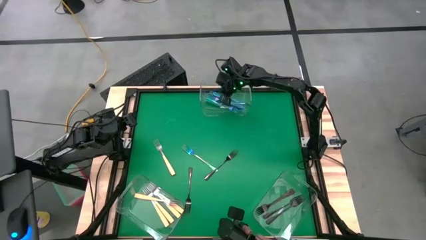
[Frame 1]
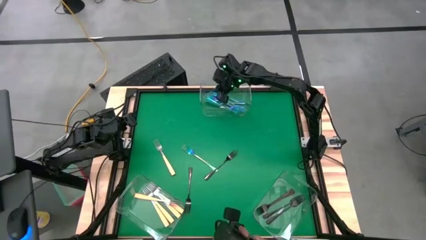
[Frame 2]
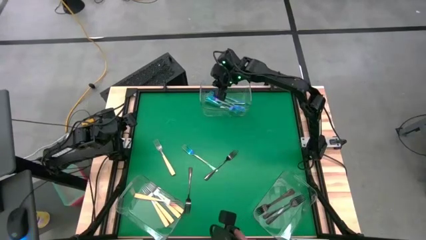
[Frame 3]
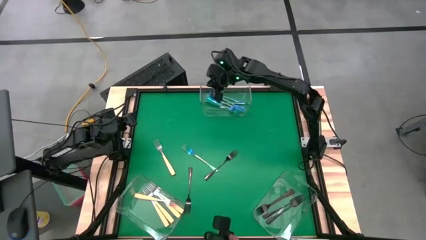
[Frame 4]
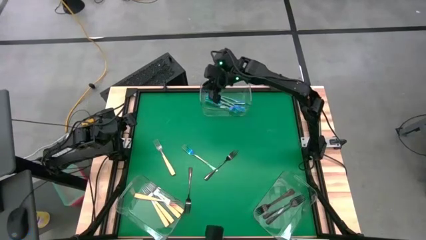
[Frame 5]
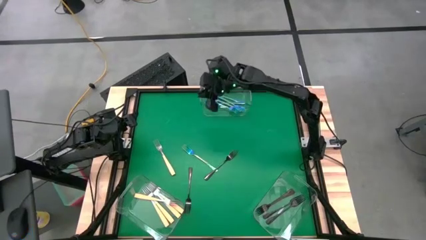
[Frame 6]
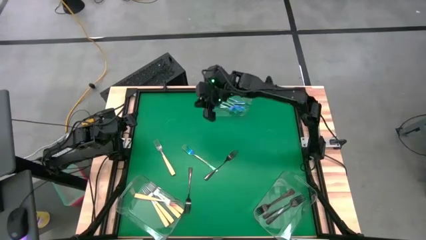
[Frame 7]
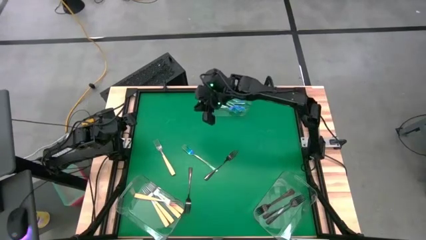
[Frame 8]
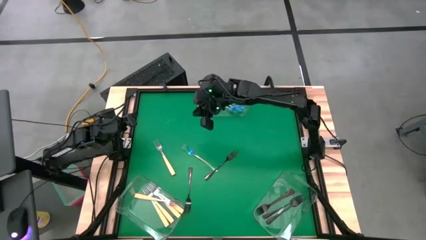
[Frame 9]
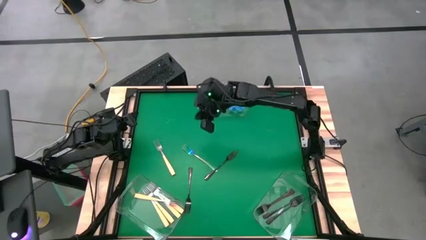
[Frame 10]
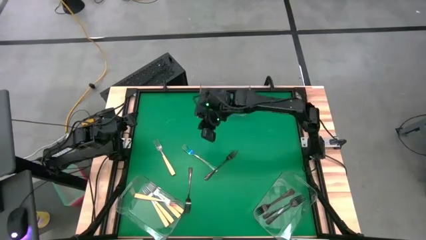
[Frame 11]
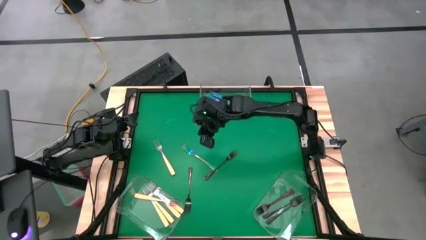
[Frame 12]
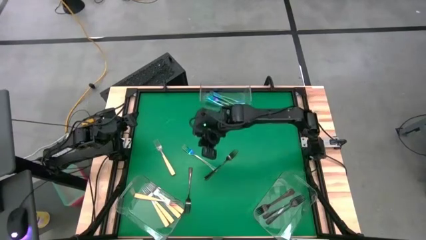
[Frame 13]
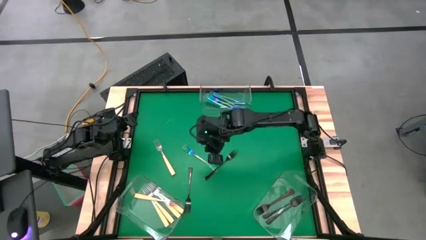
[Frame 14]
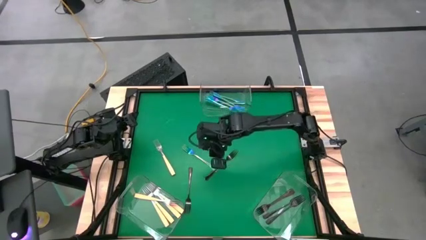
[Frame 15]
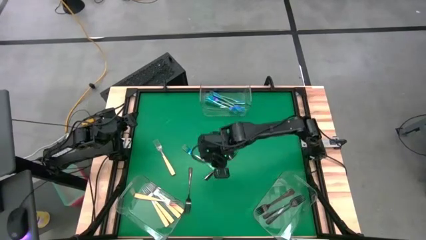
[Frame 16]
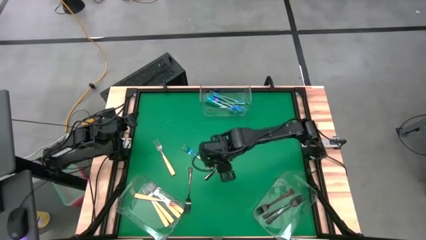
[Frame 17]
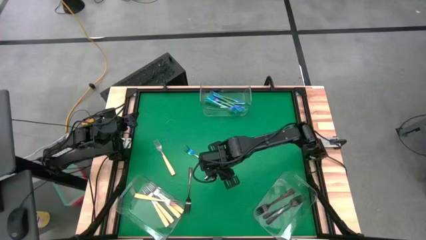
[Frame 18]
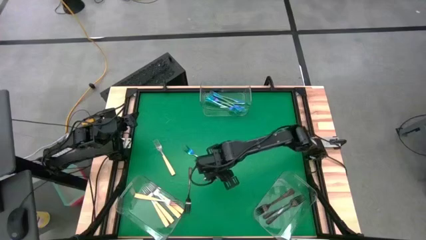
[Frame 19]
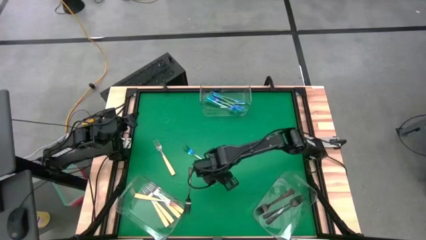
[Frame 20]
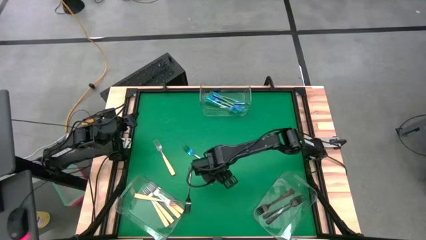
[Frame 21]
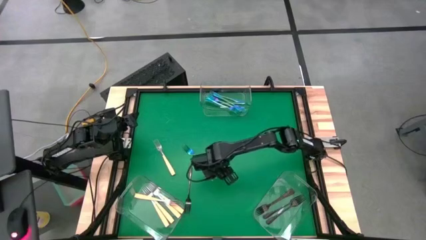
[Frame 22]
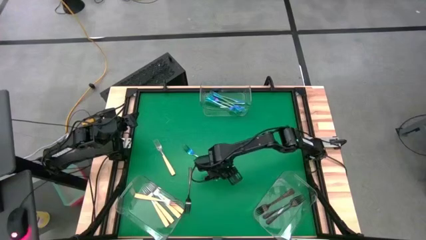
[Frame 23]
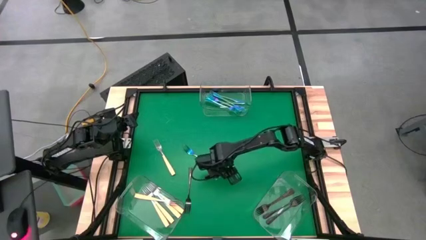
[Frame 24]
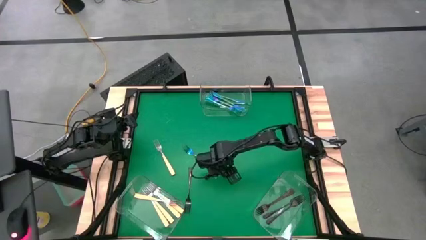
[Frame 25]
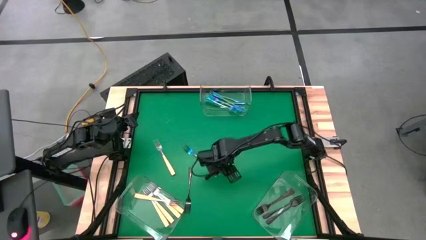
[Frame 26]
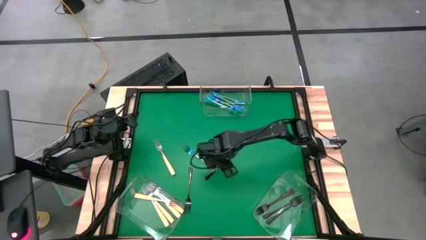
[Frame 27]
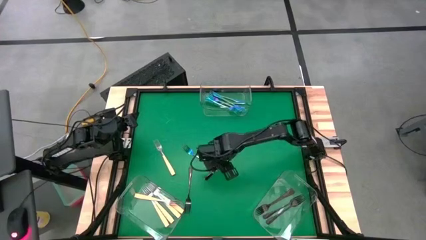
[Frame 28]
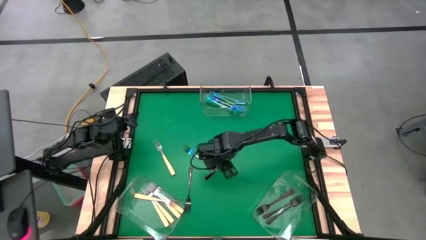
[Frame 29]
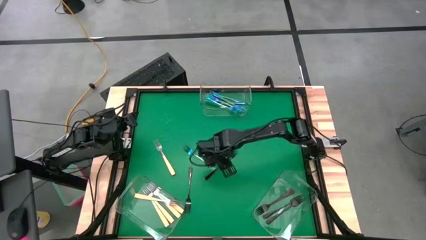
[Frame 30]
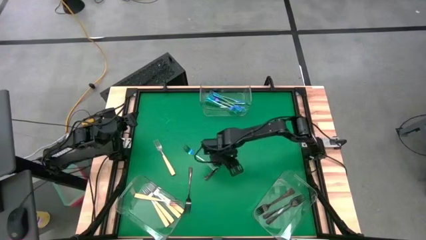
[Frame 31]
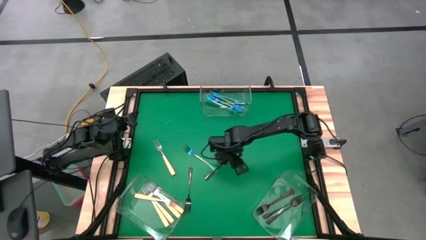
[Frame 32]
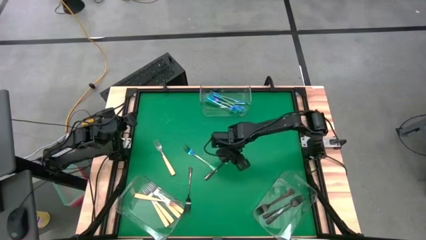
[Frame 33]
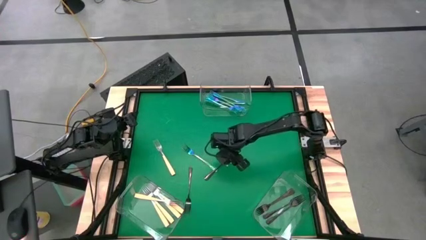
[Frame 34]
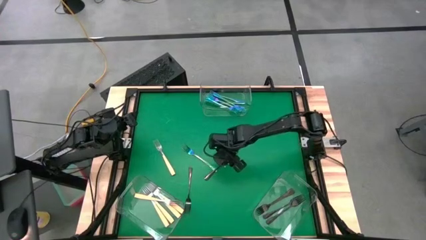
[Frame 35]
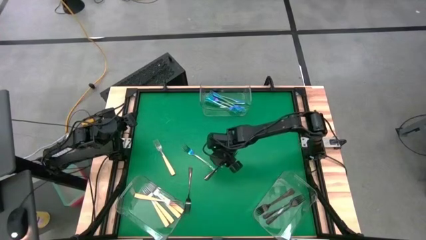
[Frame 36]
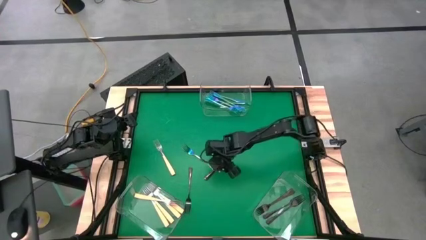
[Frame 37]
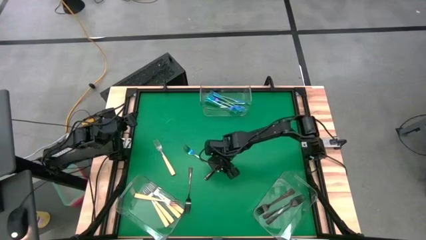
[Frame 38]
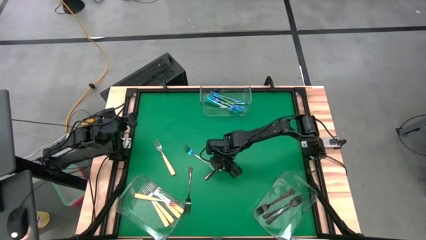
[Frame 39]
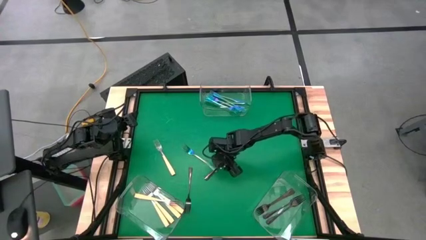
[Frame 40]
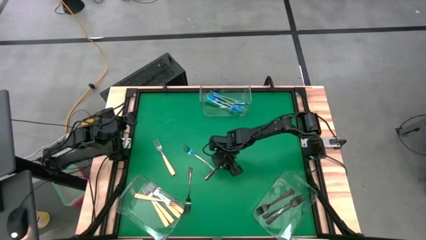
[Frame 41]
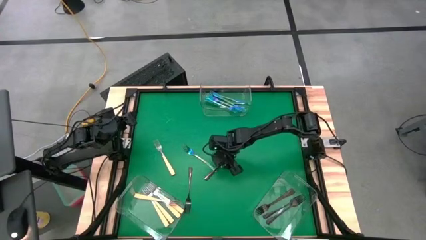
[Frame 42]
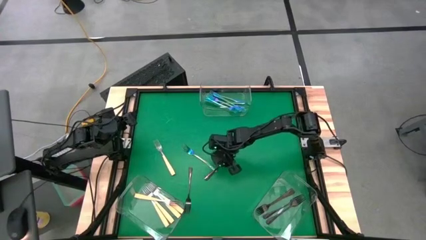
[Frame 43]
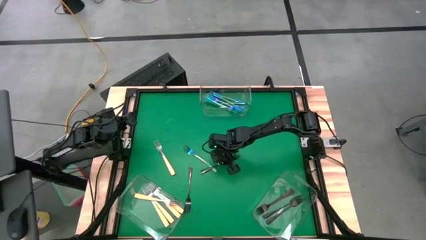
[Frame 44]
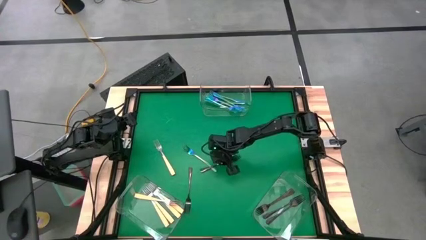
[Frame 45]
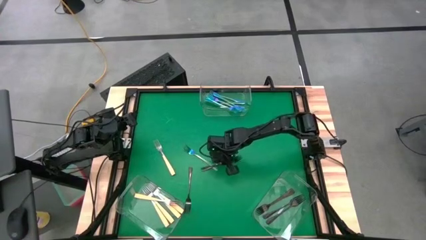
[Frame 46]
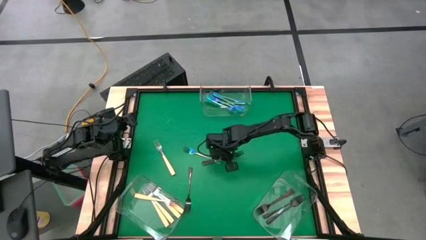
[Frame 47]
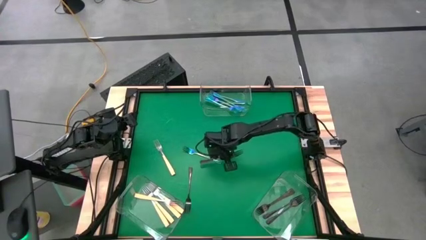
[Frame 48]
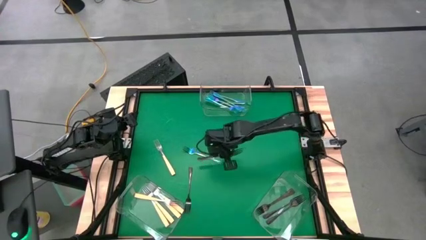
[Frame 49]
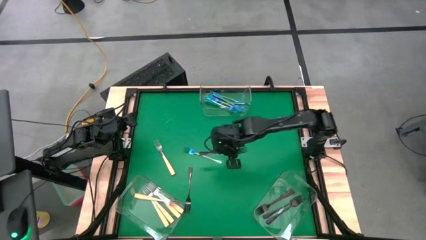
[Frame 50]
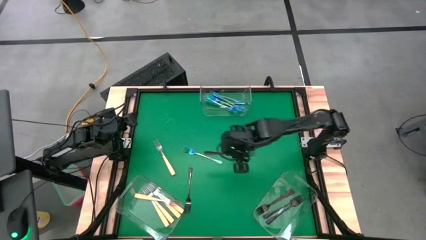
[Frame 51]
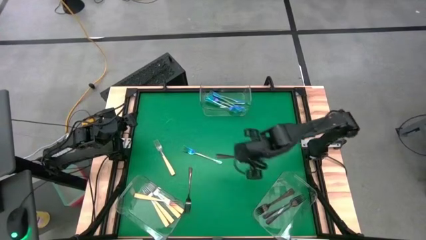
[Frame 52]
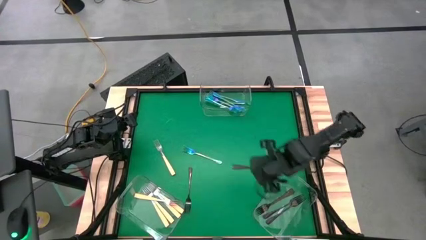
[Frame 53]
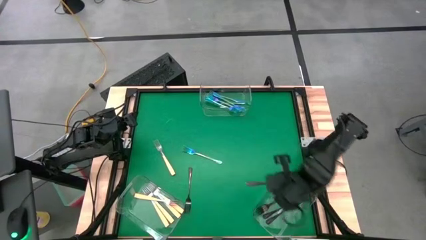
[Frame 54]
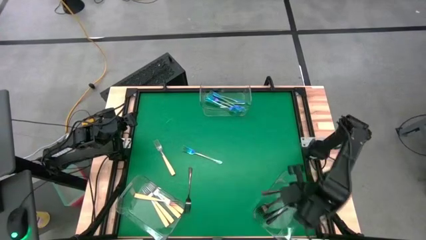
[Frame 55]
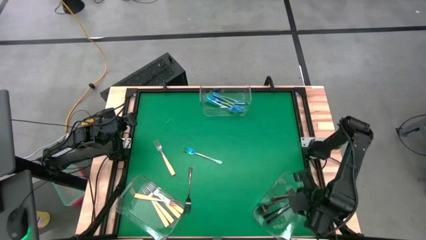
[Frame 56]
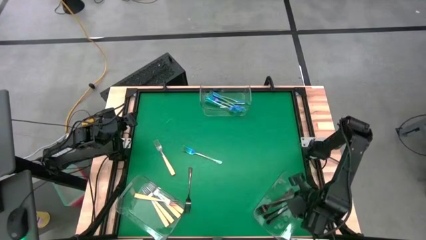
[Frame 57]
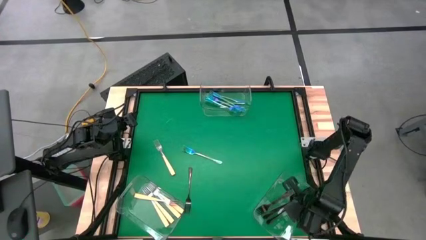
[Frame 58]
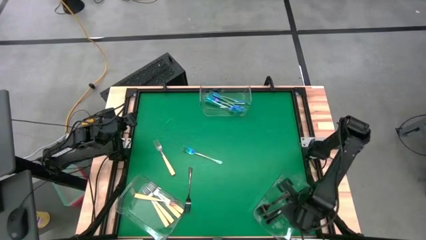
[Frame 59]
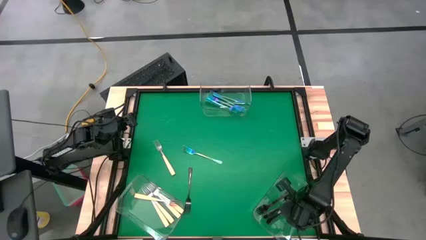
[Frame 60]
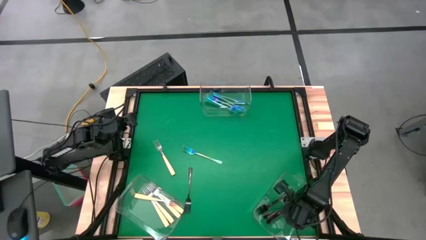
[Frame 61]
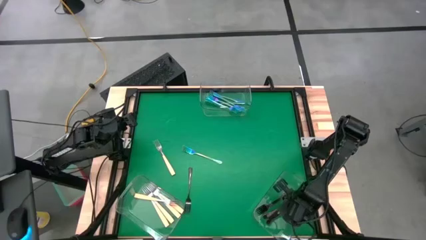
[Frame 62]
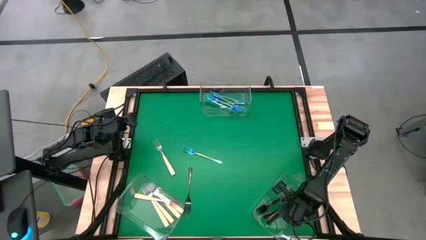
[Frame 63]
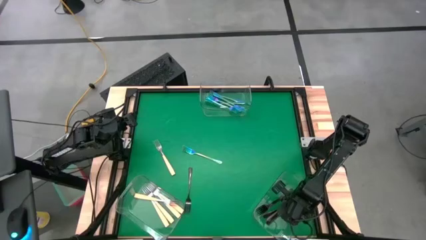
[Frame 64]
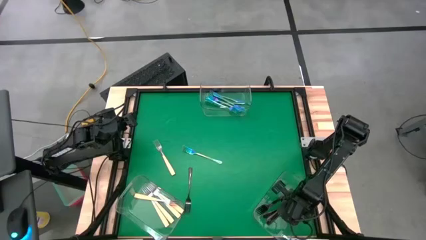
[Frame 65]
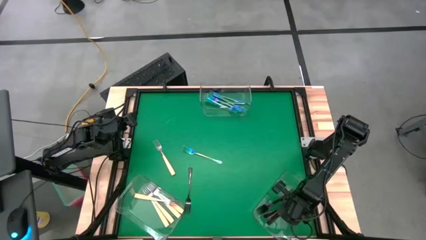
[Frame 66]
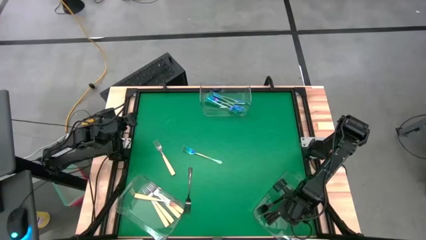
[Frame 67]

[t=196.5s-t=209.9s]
Task: Sort silverware by color (type)
Put the black fork into the bottom right transparent bin

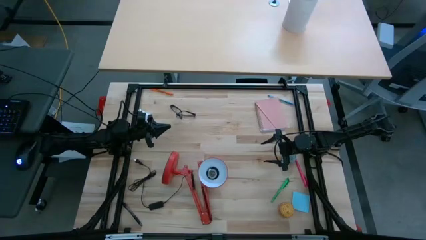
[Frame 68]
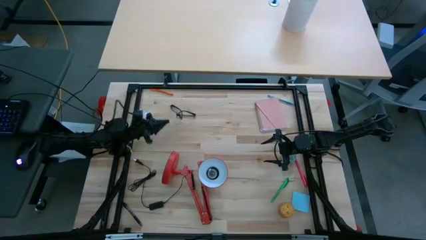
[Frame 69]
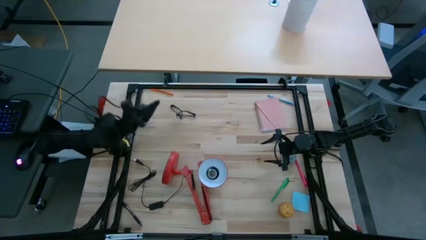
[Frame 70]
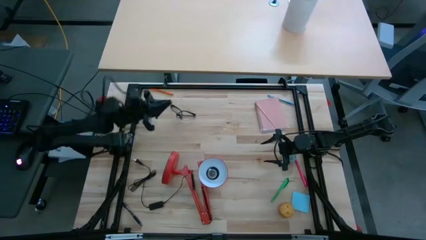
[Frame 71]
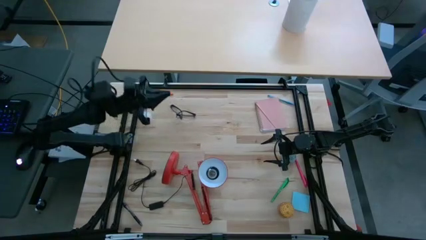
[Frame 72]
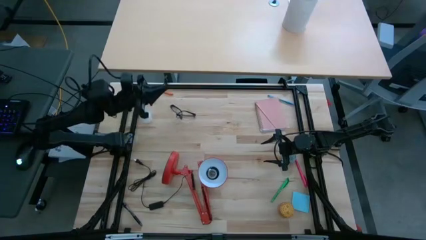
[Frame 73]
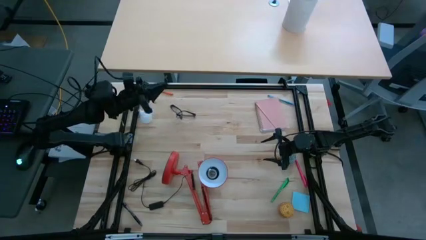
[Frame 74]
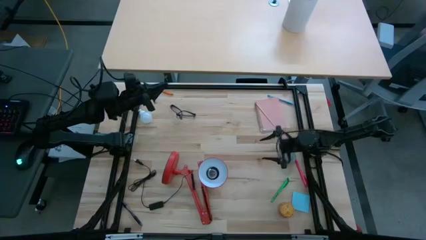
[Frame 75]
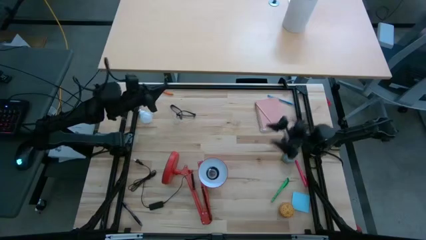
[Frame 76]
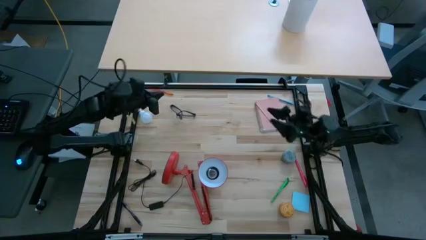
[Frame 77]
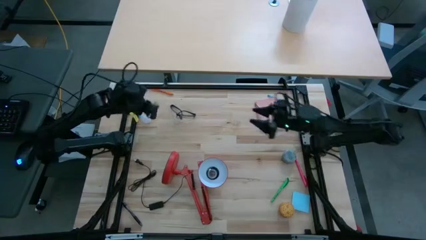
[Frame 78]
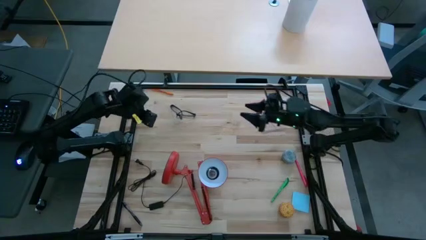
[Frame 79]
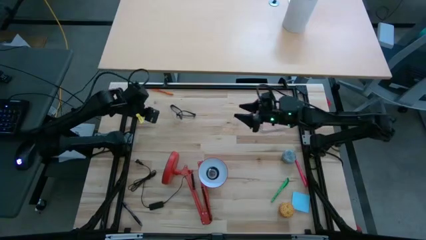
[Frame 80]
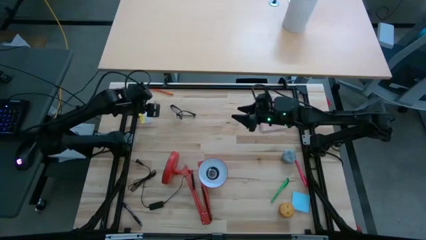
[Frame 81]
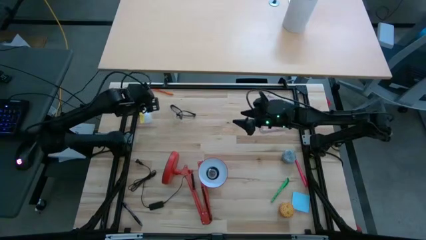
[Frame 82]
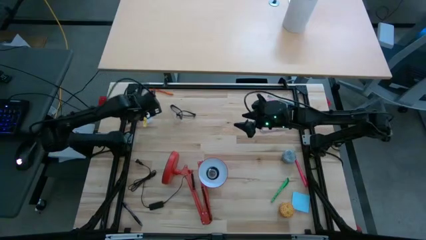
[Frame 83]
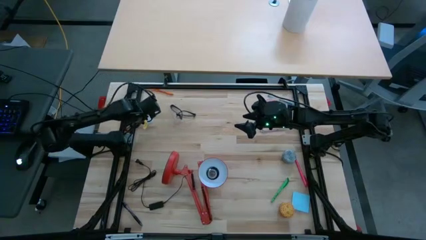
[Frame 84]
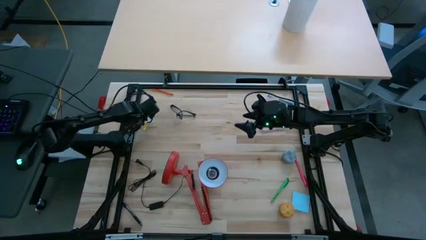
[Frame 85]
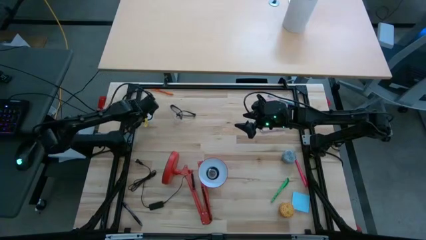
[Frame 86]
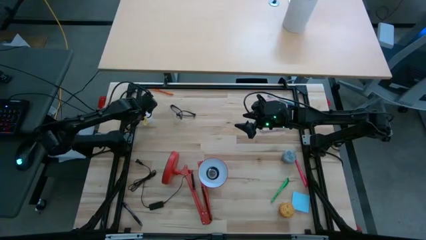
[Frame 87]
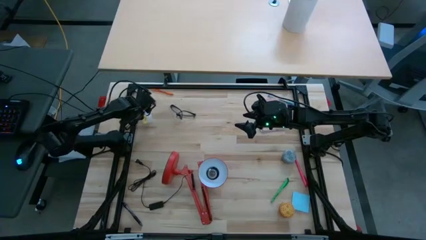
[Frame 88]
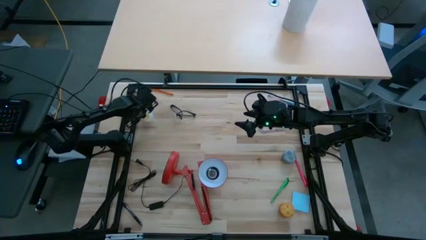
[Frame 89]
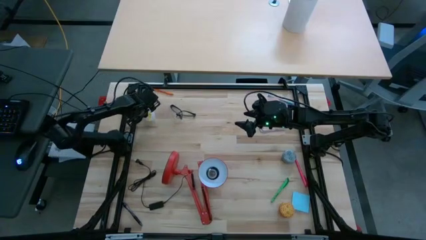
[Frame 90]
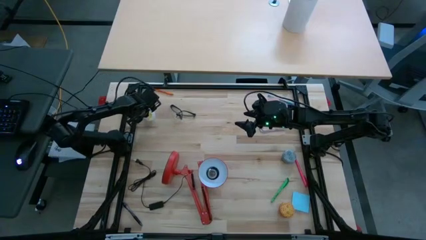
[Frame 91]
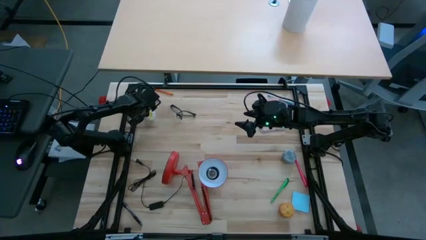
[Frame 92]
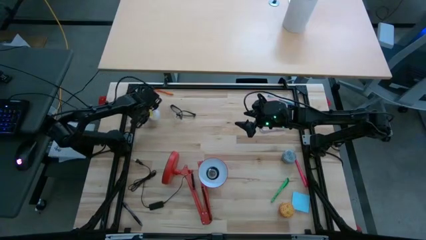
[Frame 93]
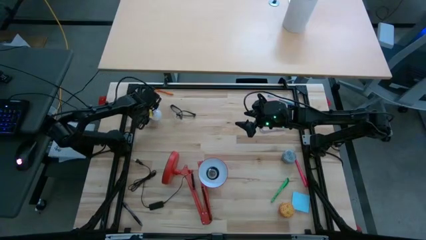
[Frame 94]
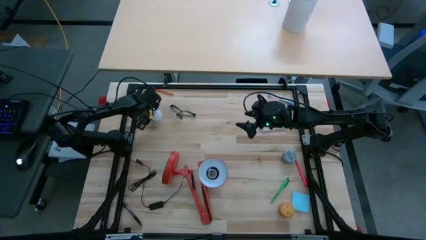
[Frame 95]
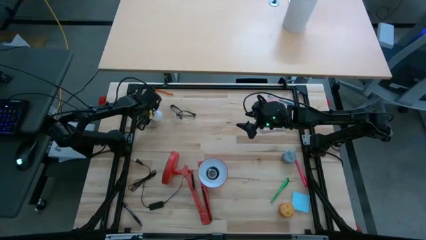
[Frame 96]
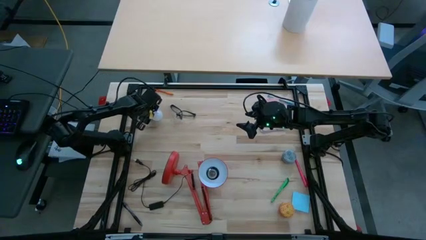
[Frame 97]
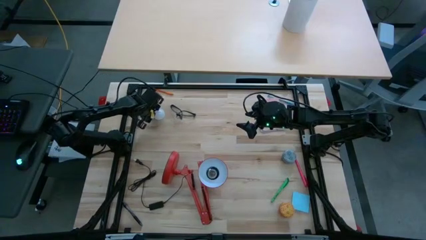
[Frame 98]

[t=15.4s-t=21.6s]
Task: Screw lightbulb
Insert the lightbulb into the lamp
